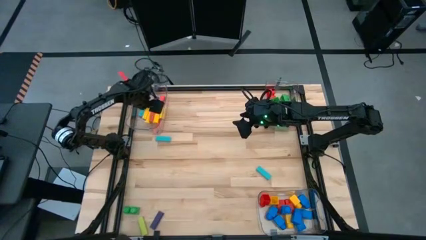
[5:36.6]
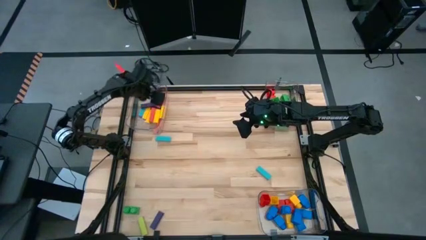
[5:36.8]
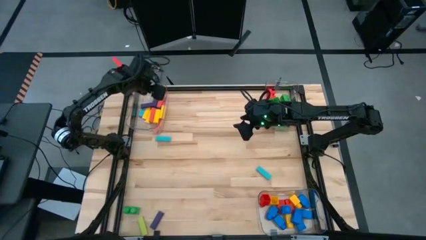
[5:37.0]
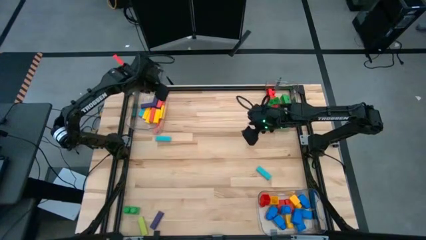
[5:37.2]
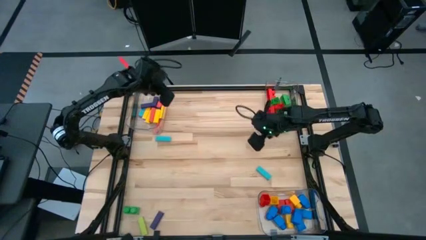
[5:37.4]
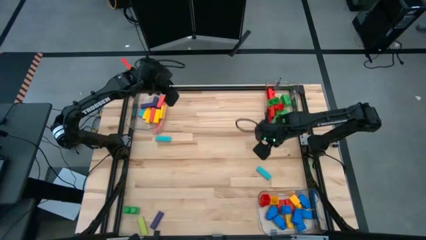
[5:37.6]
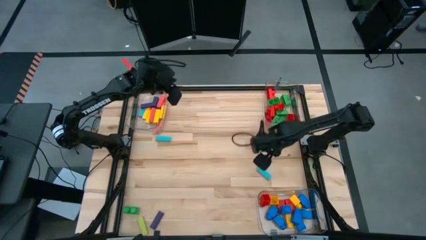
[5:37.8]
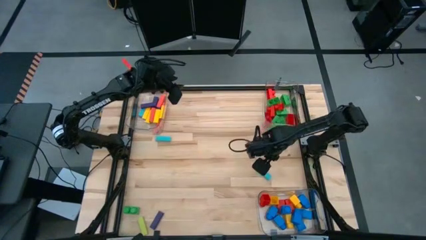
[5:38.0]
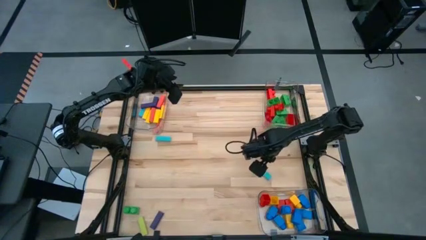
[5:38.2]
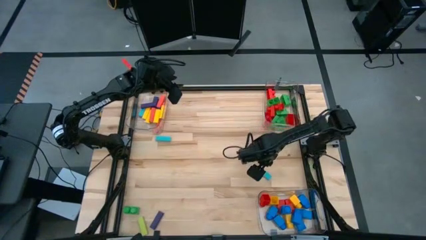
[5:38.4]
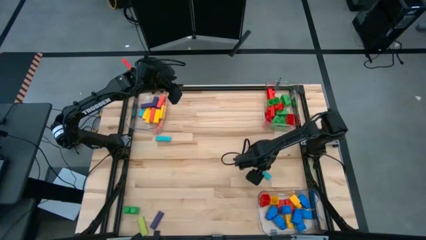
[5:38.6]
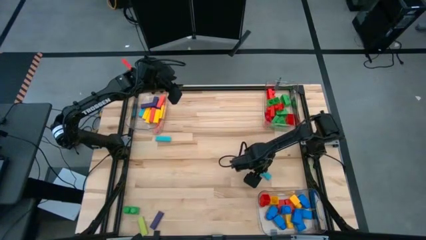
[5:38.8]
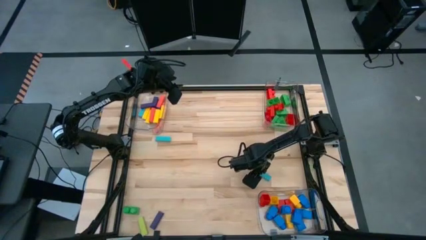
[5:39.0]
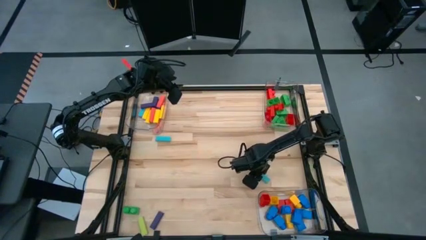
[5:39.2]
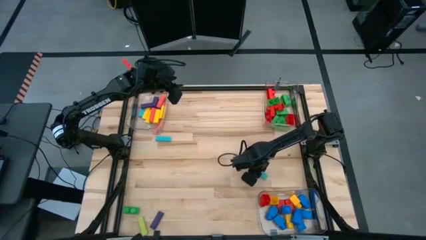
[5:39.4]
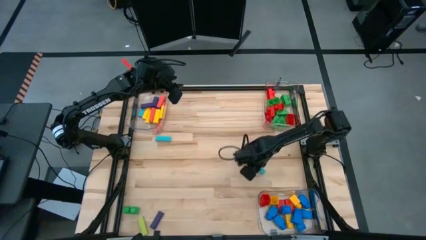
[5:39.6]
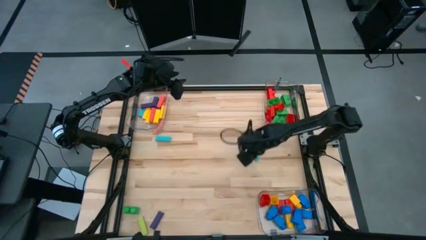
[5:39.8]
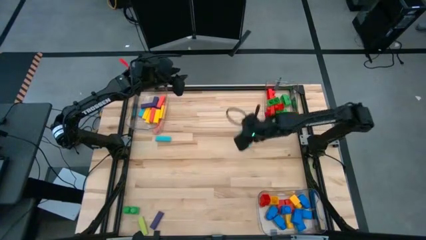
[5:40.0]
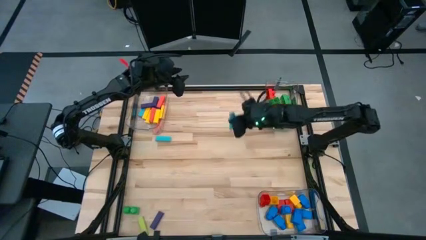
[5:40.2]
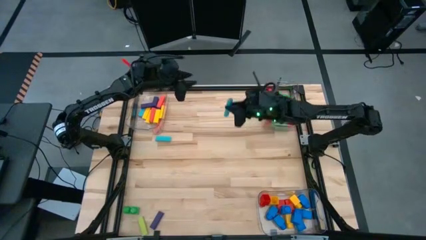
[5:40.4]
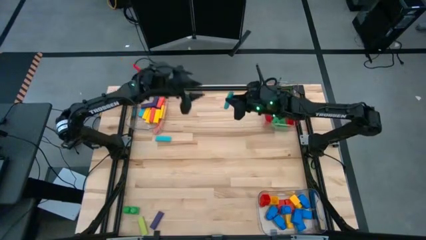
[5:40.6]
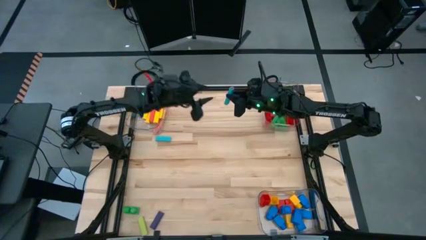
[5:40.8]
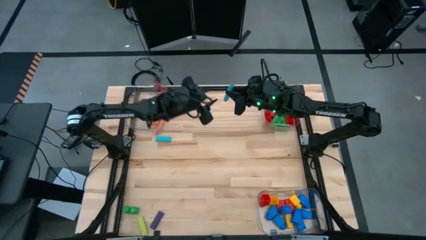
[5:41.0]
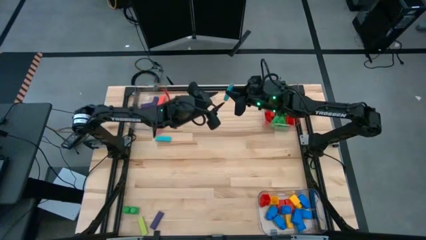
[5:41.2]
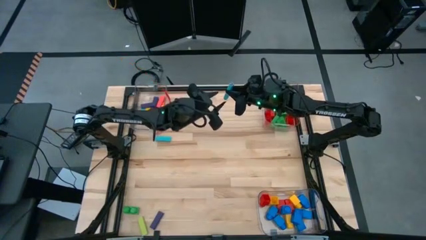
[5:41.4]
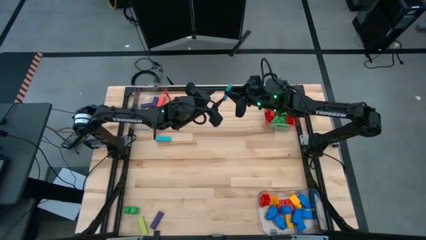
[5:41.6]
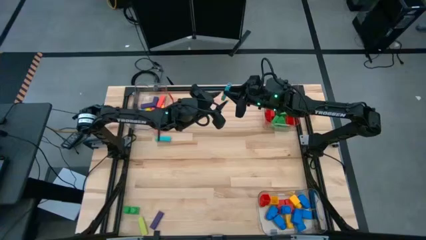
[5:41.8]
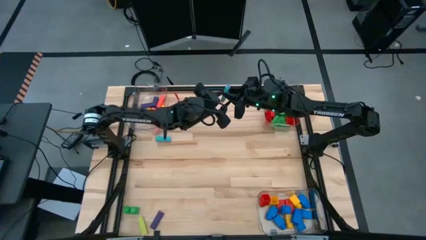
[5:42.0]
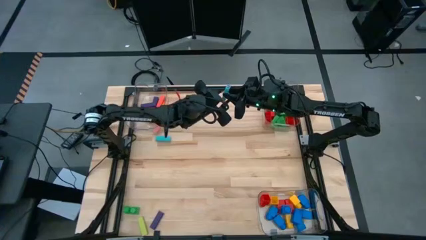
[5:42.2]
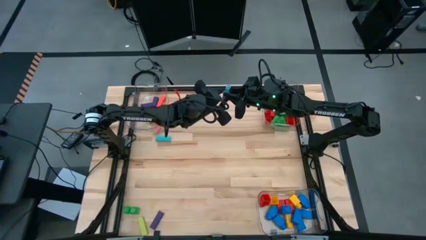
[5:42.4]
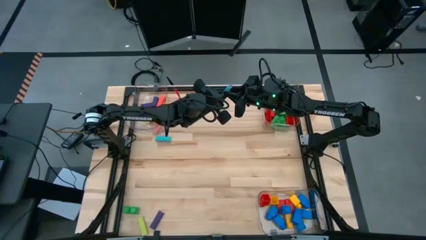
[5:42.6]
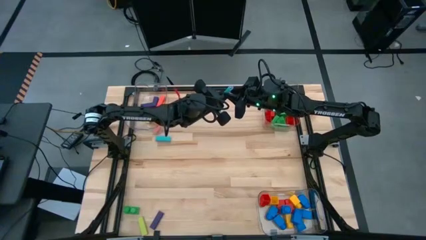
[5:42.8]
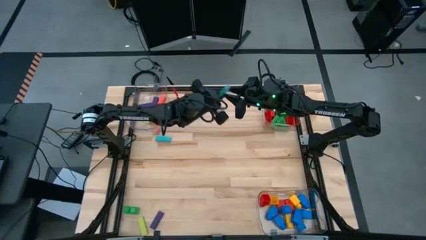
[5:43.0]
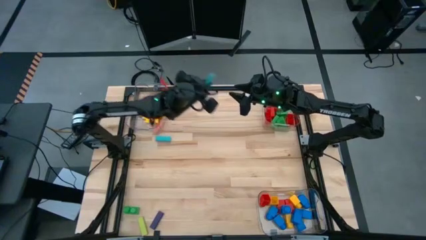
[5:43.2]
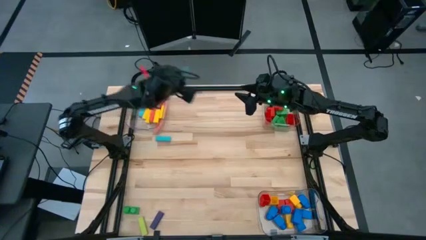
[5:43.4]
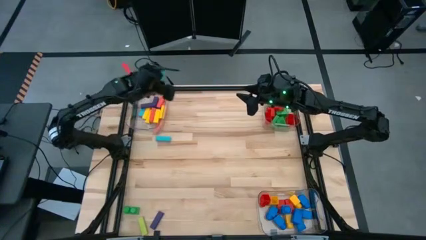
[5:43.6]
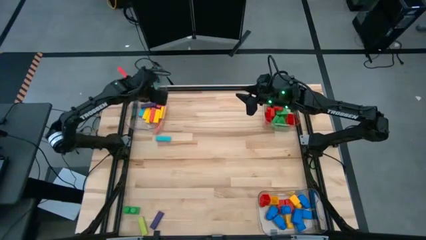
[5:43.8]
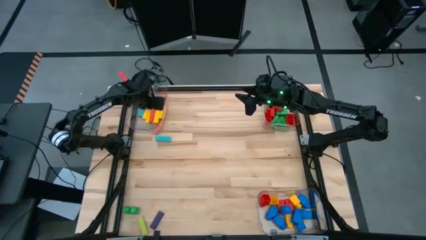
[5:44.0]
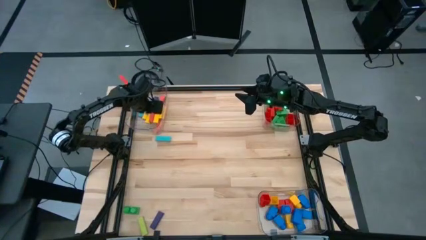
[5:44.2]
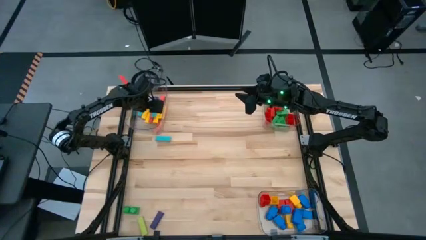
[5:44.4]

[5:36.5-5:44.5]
Task: Sort blocks by size
Put the light blue block into the top left transparent bin

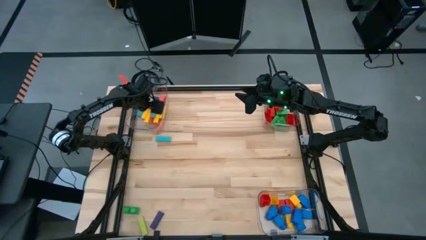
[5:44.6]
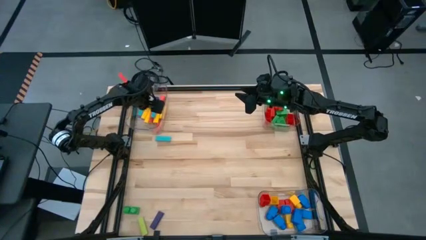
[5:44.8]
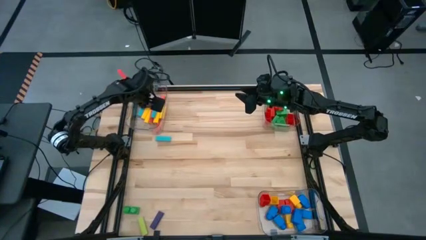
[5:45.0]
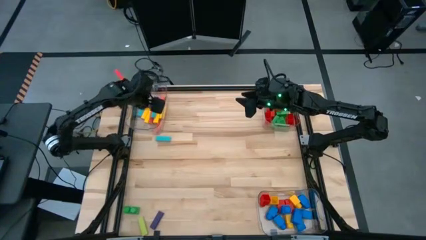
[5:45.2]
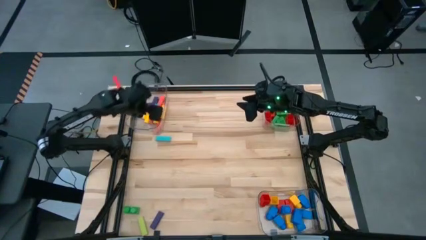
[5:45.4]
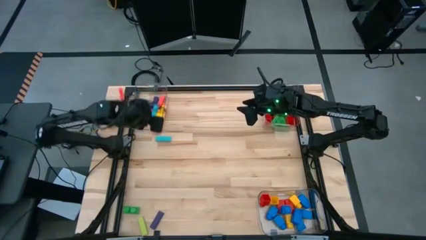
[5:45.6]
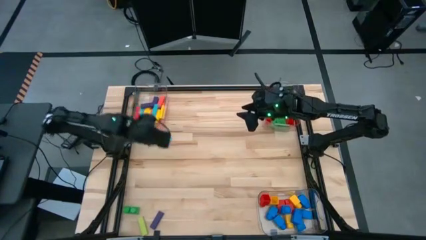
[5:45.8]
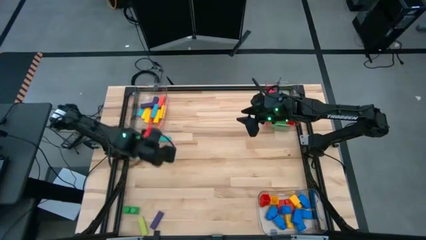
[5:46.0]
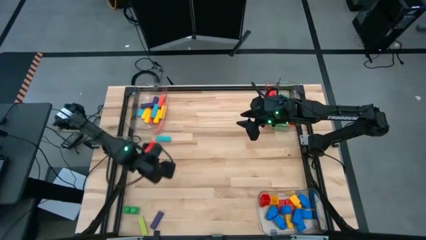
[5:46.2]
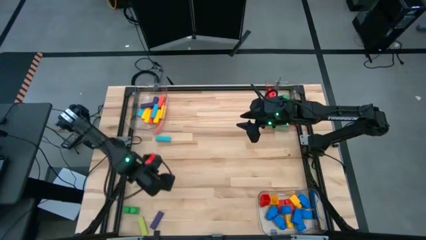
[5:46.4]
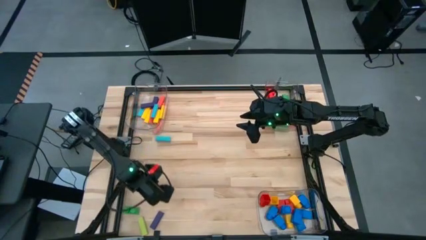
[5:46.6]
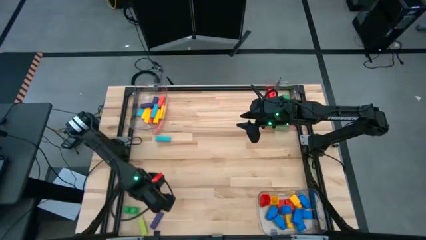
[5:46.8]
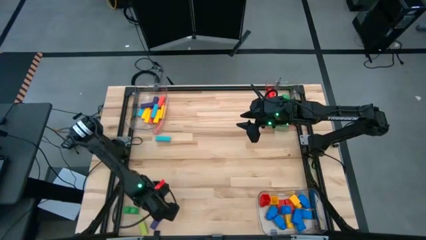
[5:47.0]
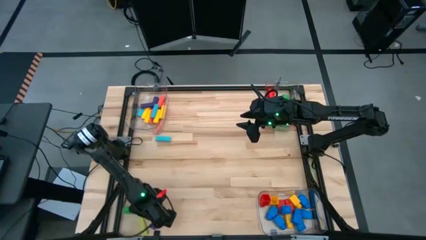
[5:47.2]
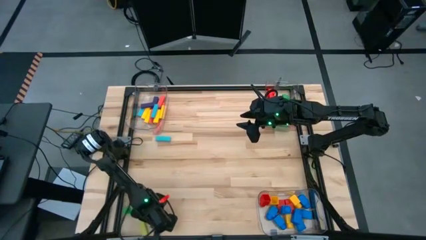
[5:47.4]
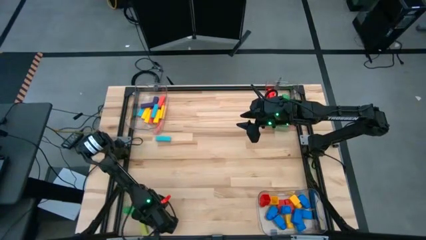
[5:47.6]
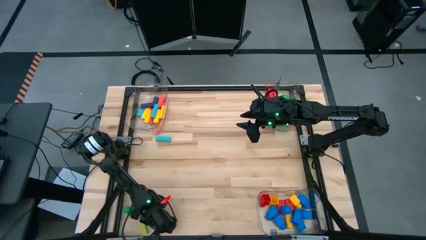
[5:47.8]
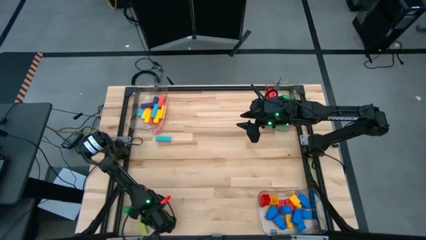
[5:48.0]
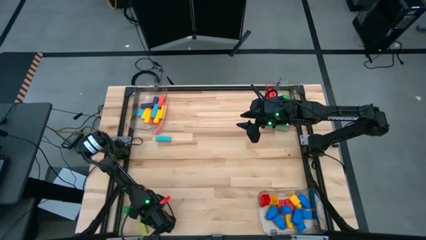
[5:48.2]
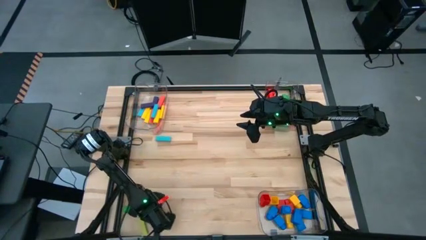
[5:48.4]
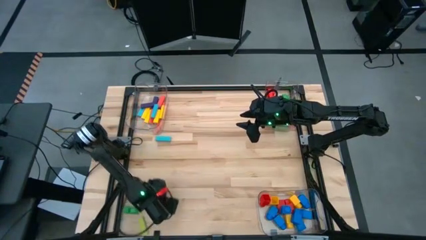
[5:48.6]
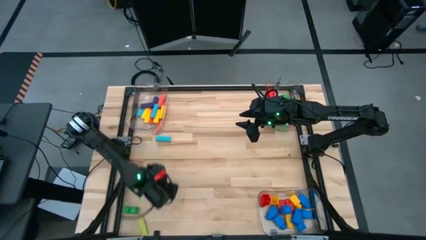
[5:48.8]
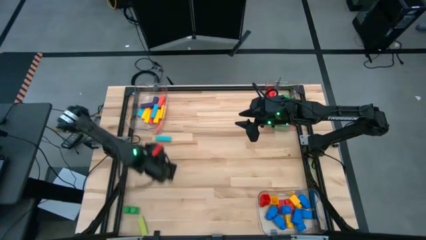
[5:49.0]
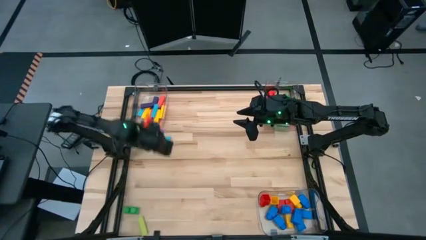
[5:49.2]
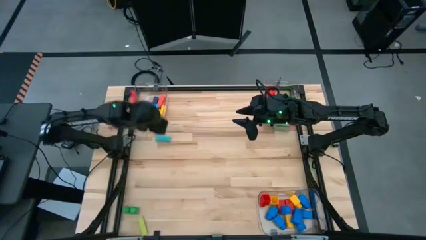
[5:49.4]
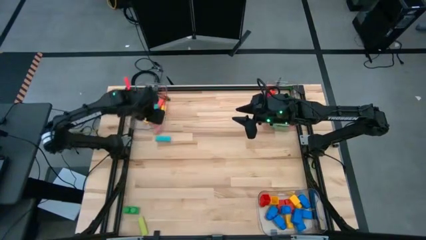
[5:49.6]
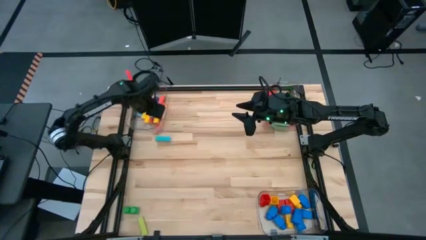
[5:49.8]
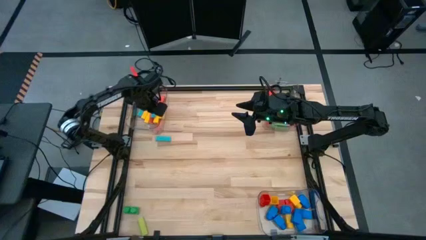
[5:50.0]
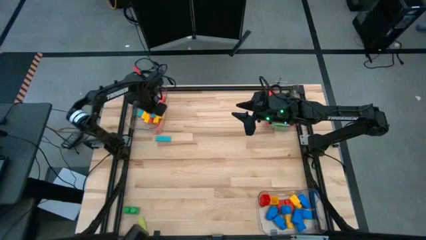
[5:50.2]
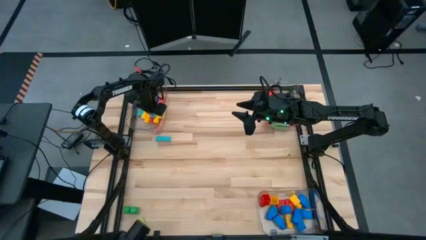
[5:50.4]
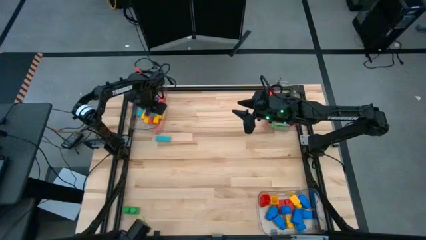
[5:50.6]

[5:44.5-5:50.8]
Put the purple block into the top left transparent bin

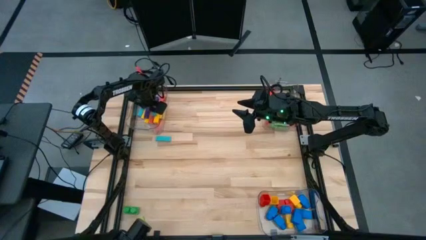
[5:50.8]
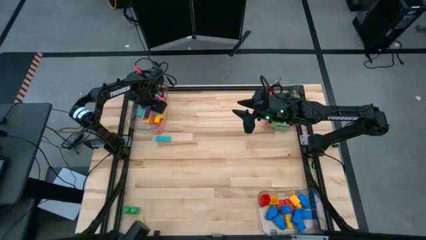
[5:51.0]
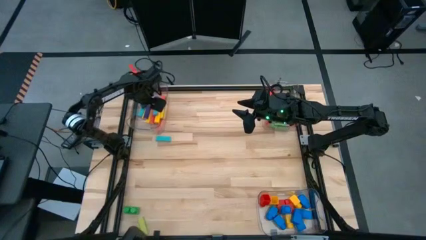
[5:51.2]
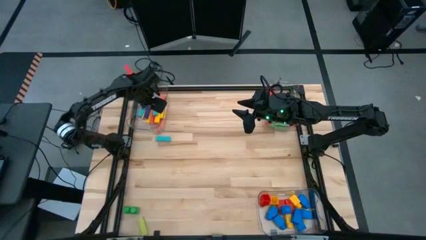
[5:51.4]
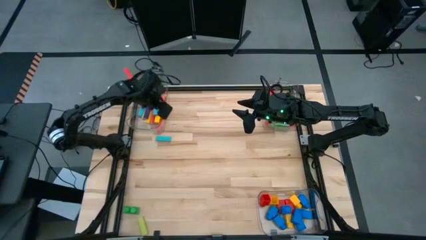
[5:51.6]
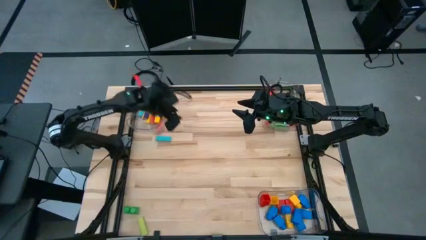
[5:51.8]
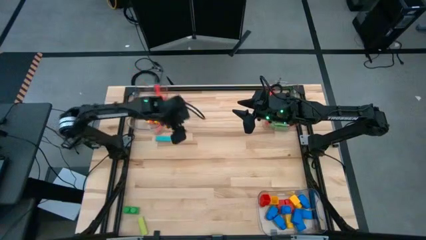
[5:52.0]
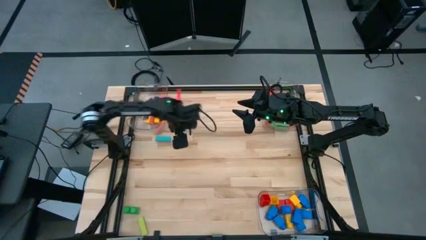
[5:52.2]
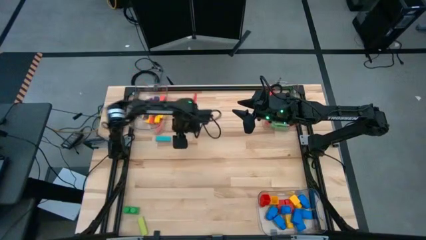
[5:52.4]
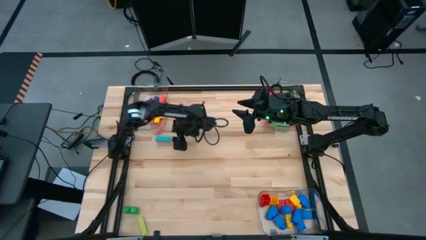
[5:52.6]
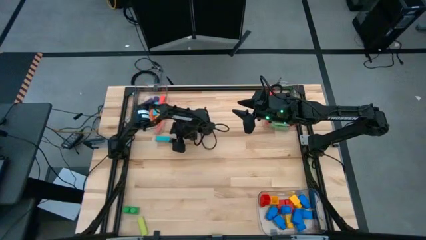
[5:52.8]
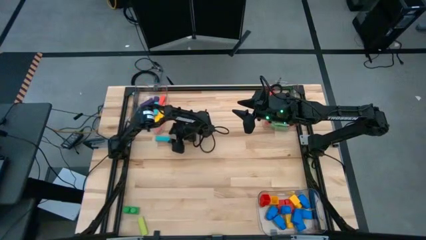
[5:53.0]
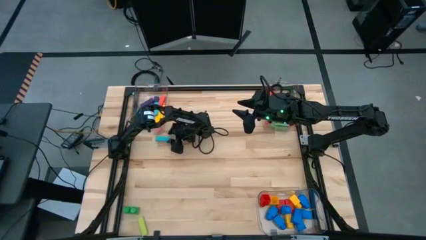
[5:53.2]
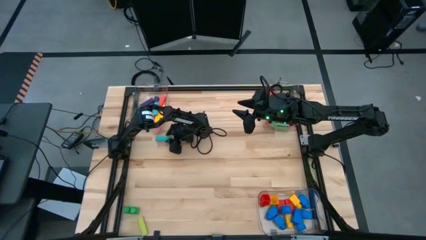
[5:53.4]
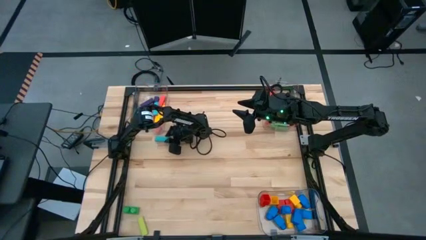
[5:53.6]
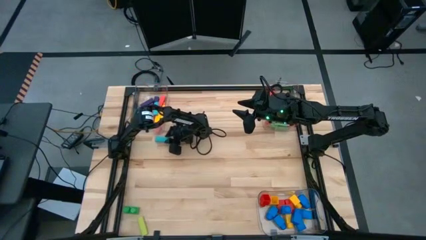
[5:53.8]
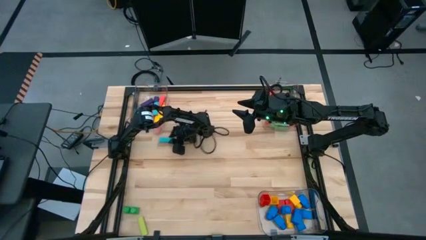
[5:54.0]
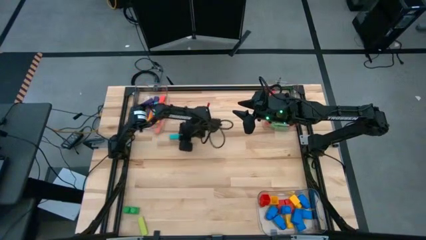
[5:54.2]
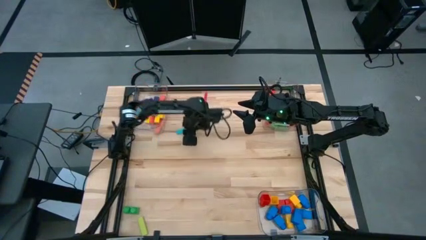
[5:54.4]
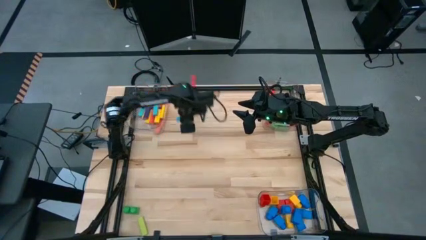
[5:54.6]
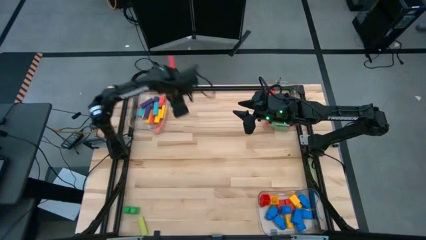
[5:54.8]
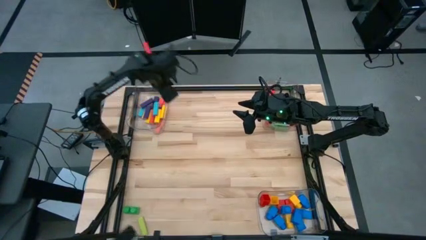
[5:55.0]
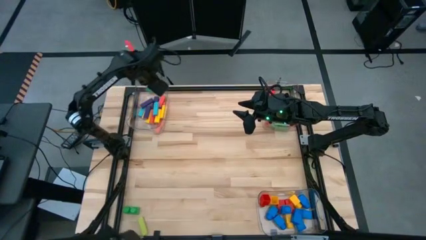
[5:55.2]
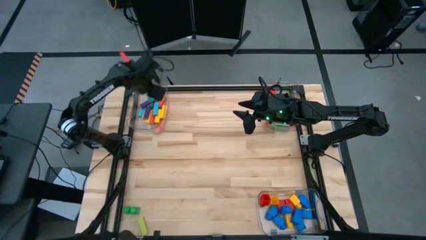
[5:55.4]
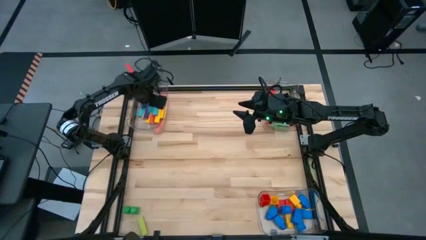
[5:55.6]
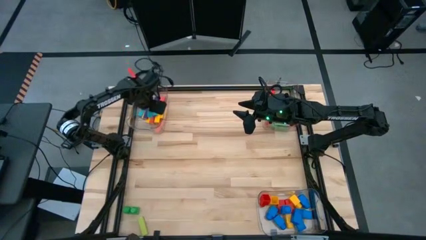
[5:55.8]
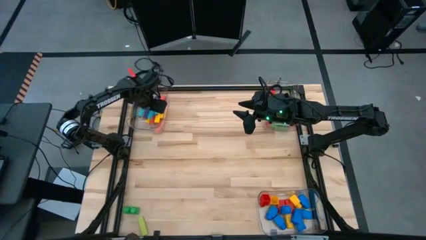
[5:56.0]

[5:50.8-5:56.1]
Put the light blue block into the top left transparent bin
